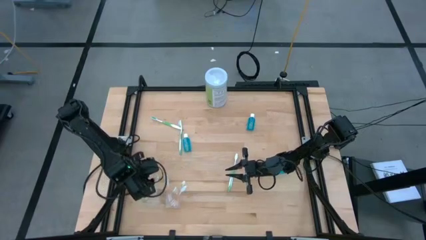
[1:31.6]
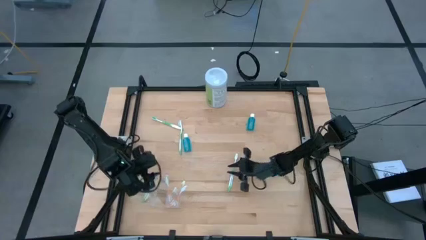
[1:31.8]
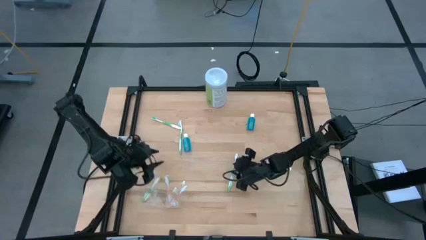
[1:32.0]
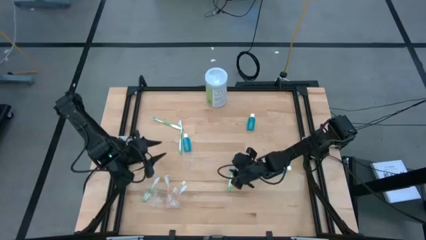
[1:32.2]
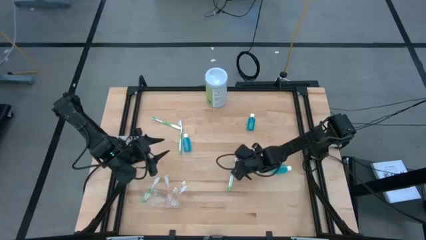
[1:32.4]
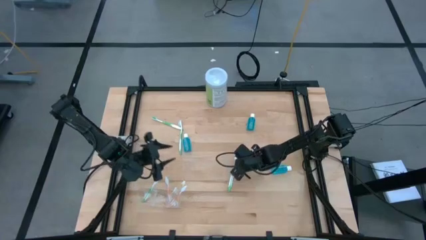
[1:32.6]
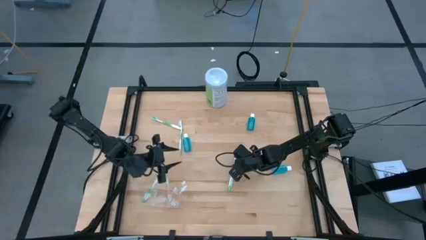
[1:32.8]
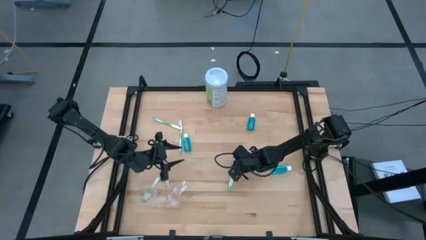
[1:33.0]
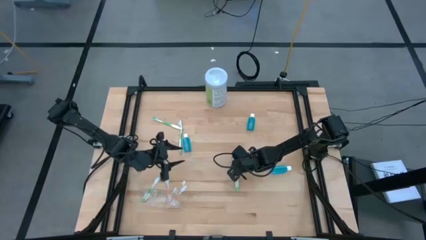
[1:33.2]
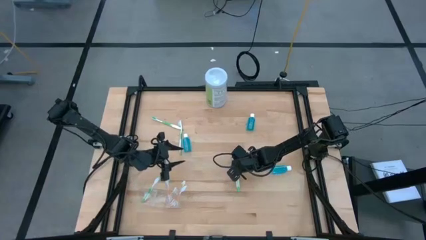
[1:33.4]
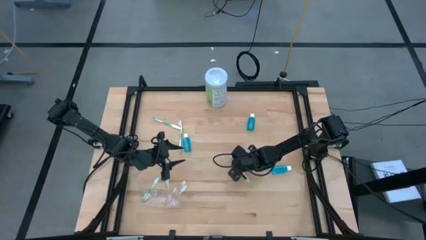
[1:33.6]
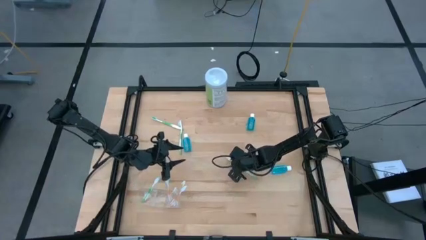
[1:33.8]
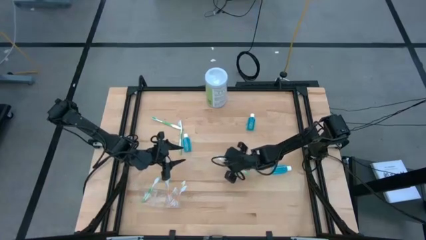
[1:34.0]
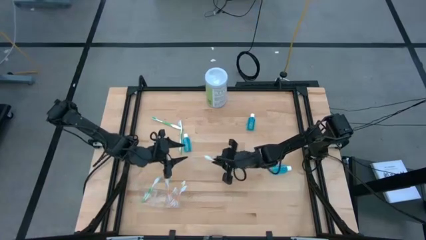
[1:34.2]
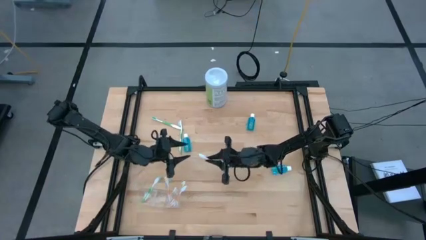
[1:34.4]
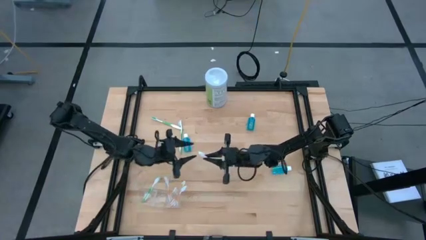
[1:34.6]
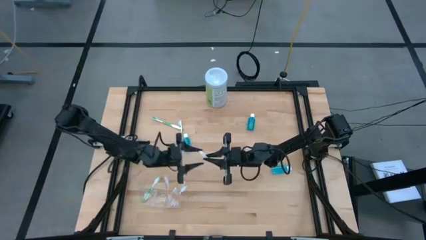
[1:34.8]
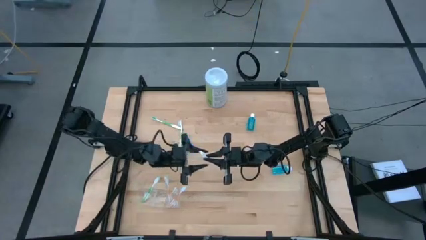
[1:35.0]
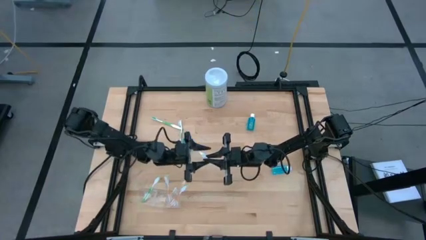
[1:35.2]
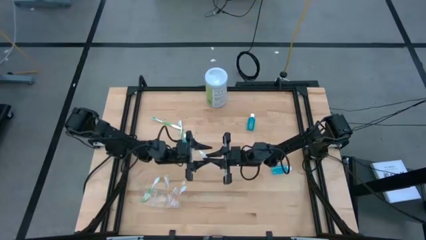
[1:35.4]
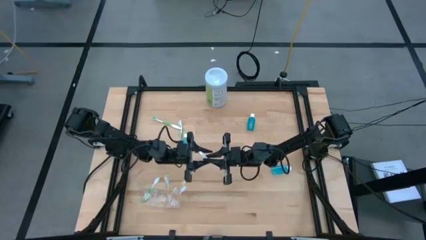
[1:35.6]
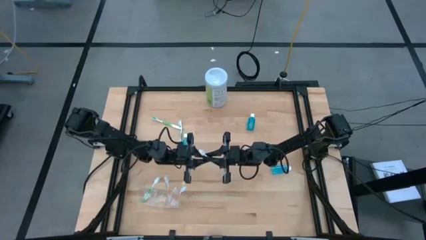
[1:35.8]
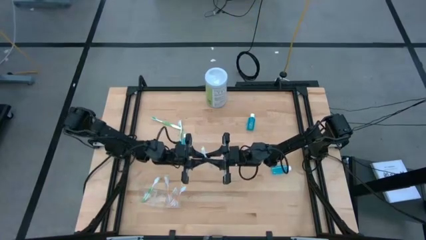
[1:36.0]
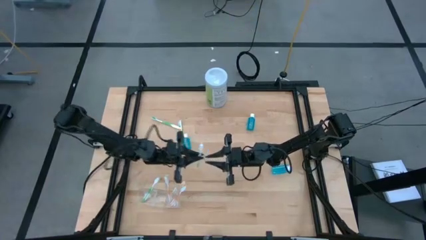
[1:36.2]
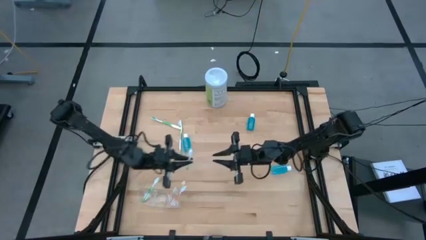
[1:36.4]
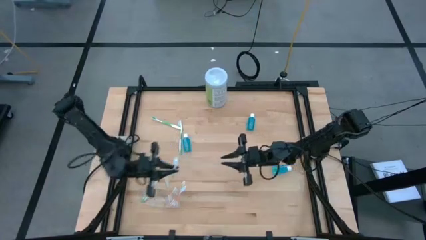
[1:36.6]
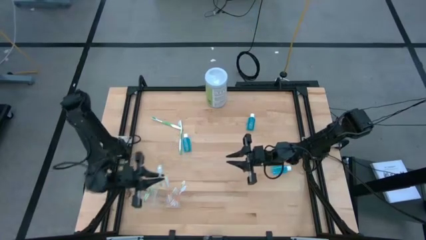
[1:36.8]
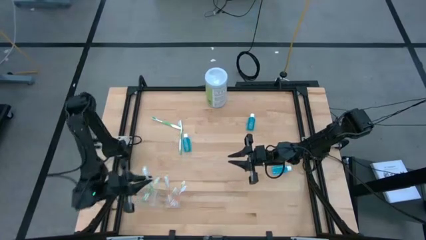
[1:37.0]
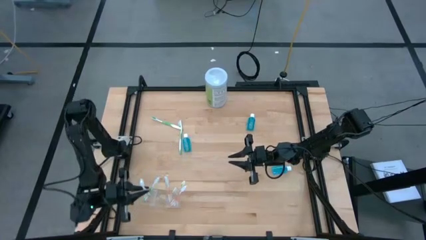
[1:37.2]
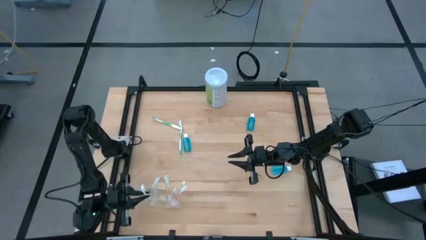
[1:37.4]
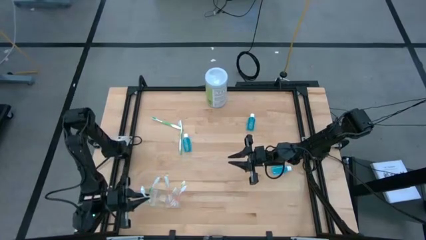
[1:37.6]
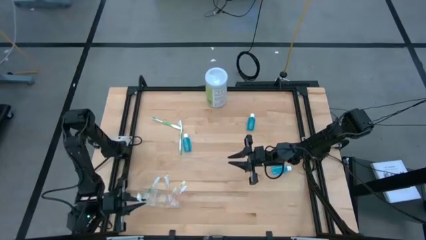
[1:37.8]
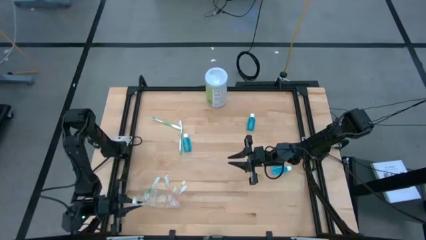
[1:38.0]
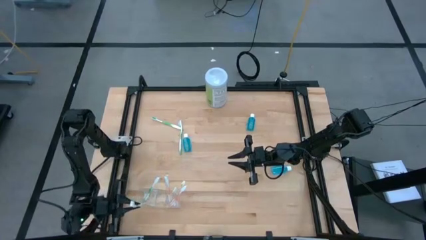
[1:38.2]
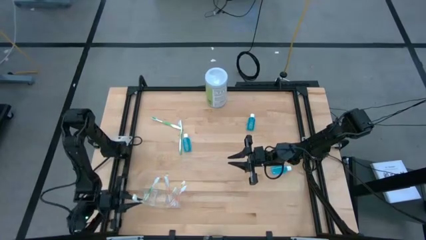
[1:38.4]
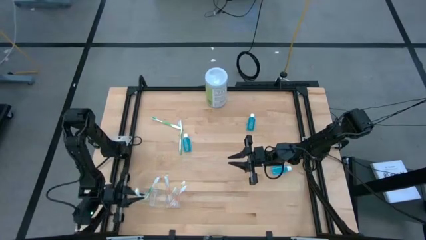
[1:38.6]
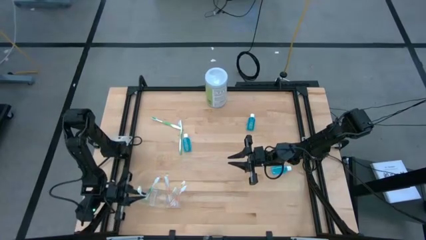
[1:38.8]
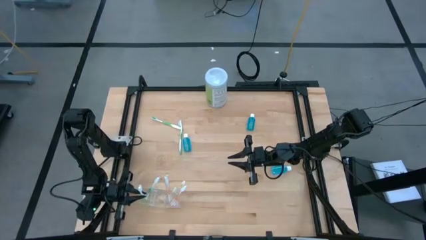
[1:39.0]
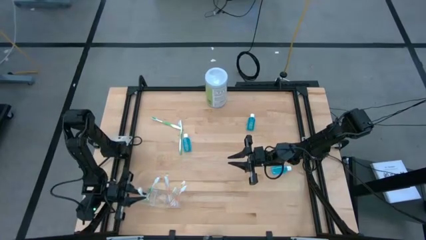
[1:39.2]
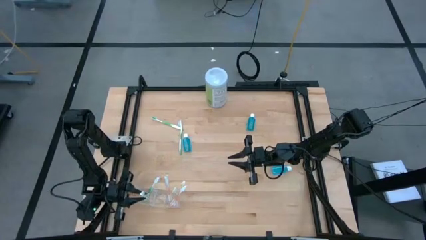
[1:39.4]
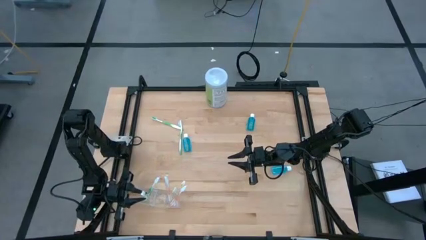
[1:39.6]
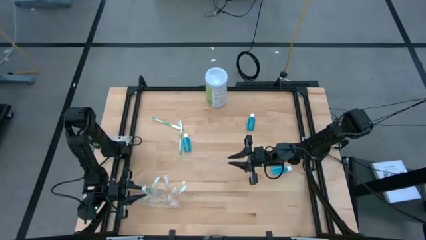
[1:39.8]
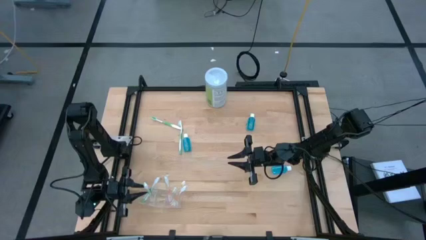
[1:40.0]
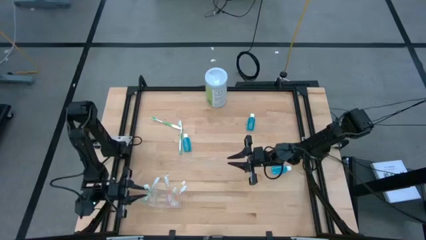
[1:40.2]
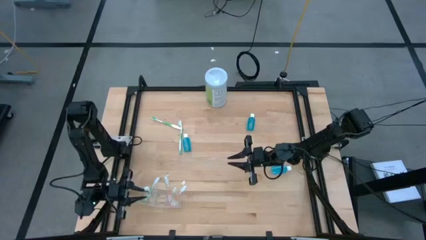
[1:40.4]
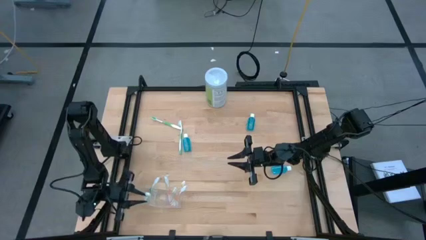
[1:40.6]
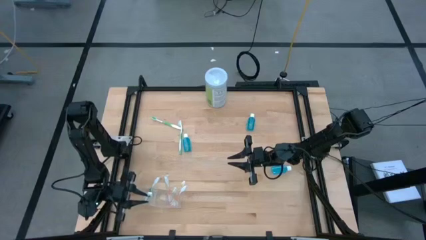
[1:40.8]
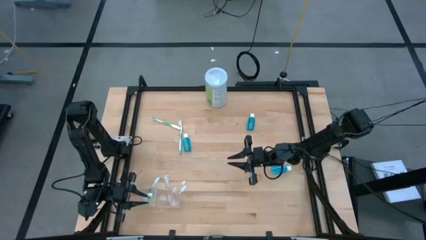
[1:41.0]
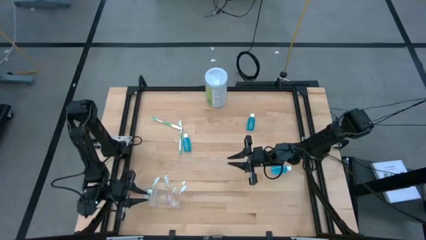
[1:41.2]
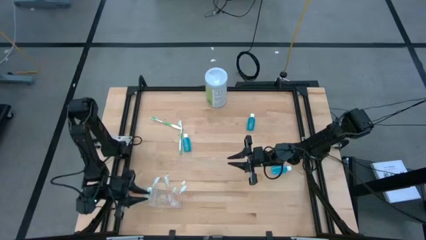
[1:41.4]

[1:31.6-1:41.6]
Task: Pick & Place toothbrushing station
Put the green toothbrush into the transparent organizer
